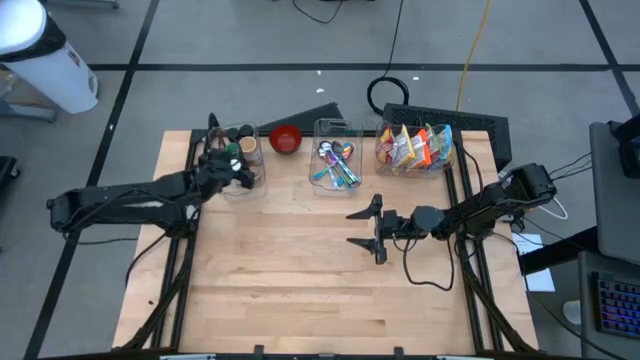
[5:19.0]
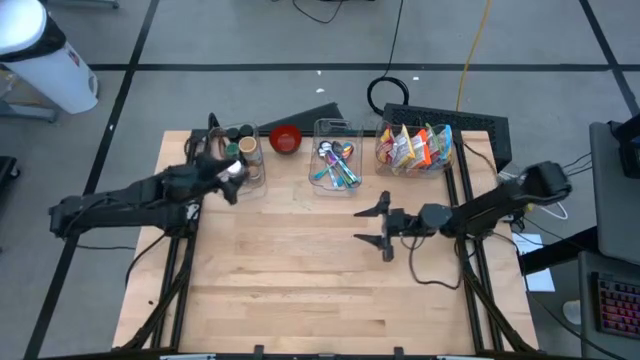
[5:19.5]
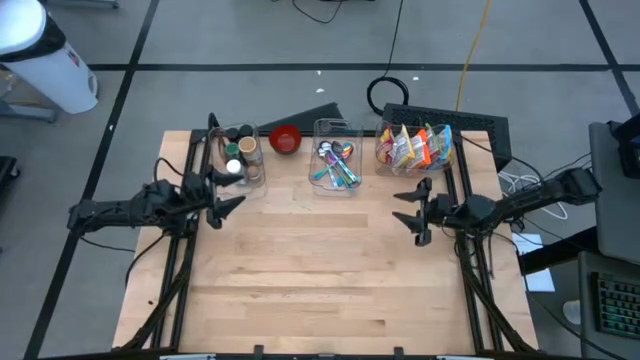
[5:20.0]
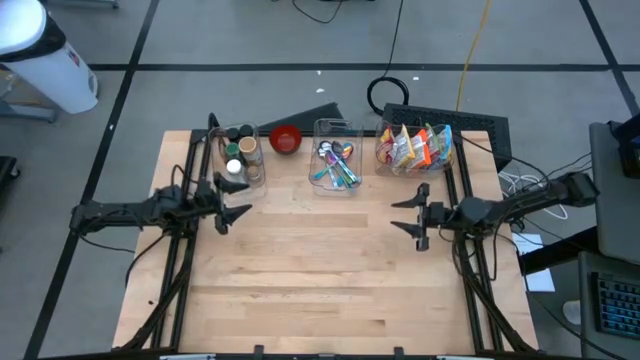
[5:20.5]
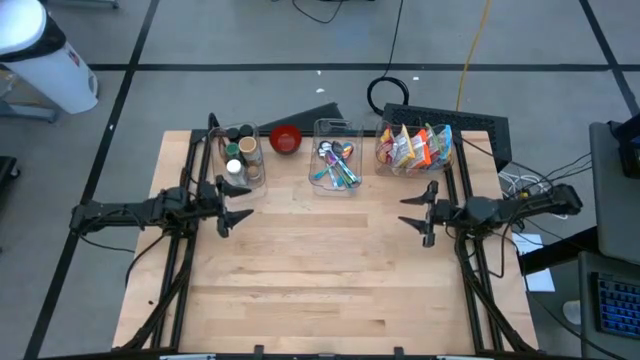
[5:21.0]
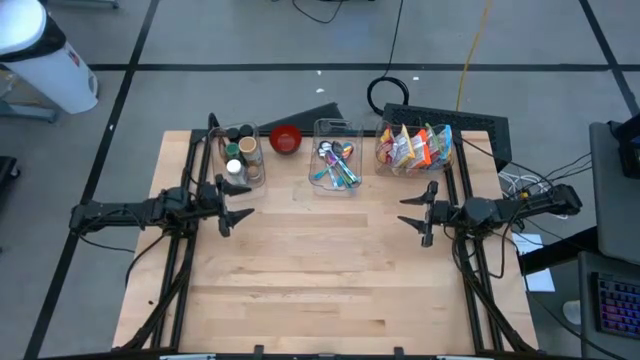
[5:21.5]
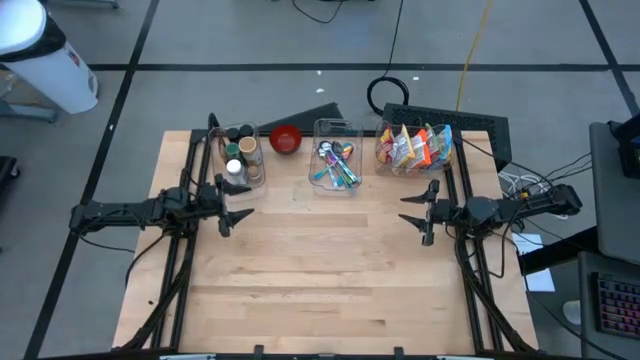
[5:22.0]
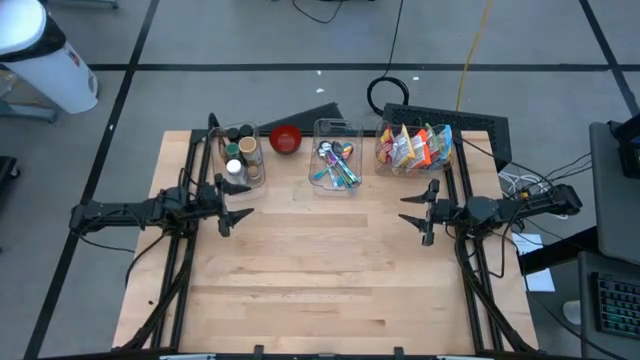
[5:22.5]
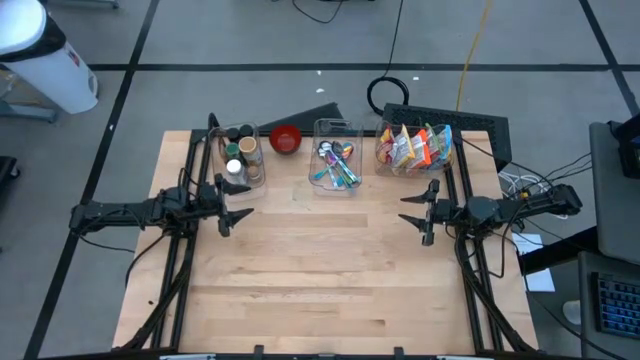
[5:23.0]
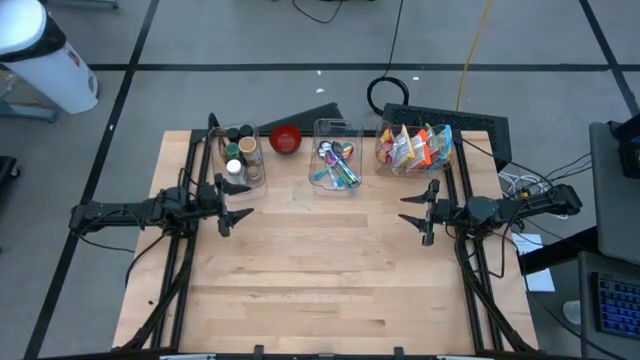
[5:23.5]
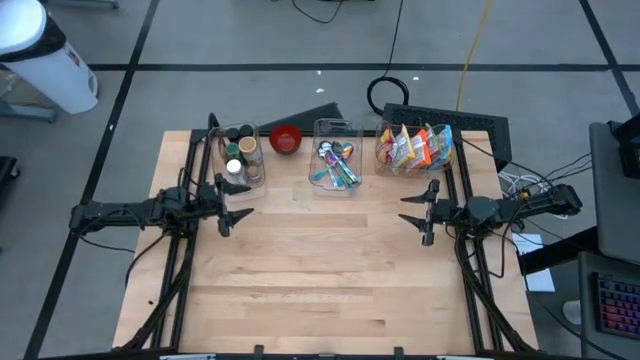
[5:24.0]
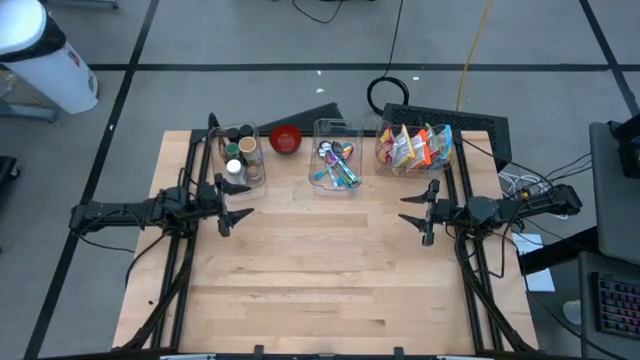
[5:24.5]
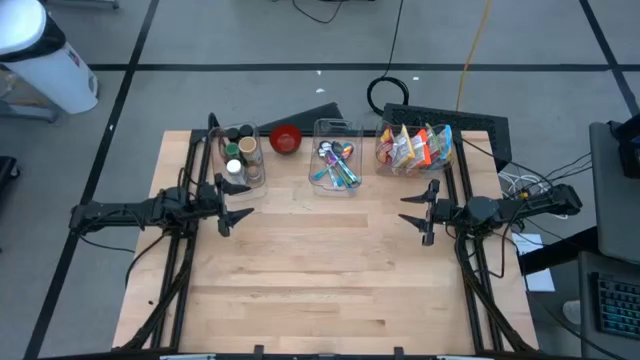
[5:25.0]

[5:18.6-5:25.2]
Task: Pick & Place Food Item
Return to Home Position

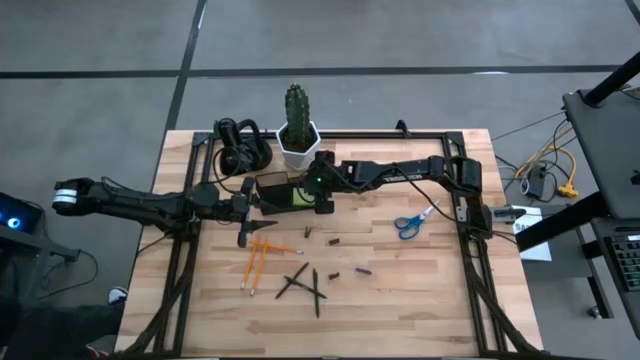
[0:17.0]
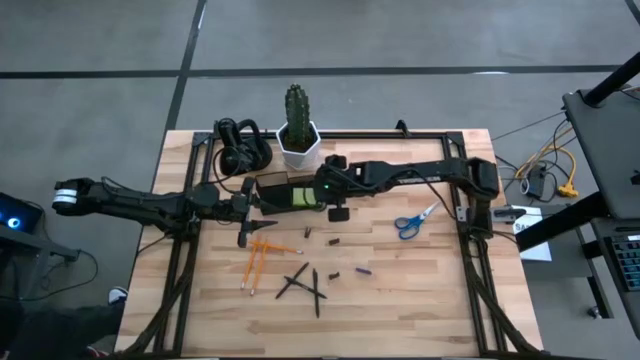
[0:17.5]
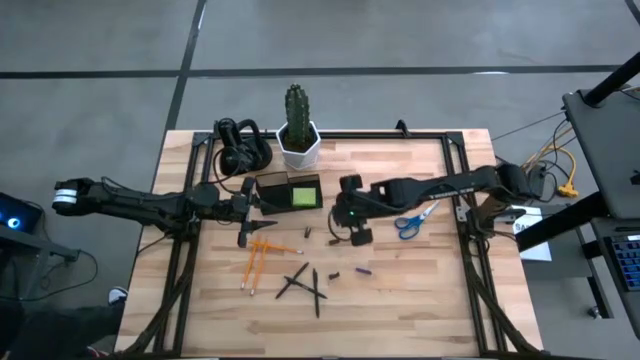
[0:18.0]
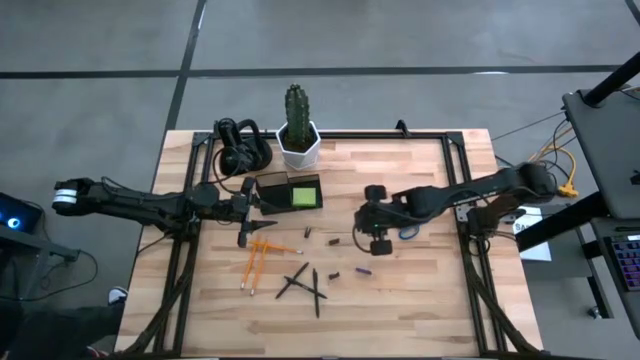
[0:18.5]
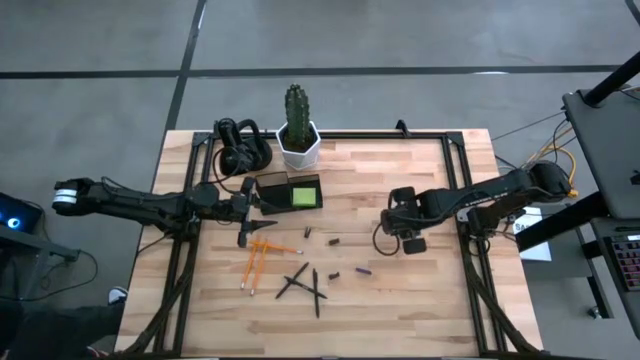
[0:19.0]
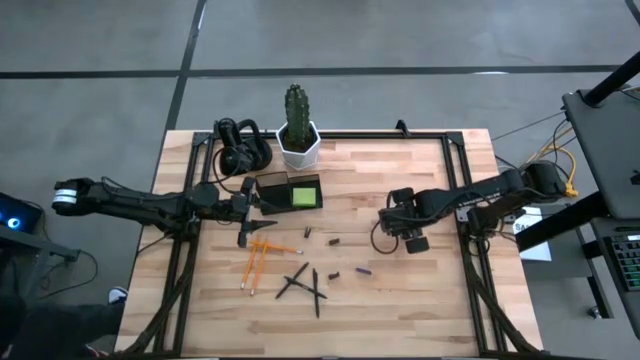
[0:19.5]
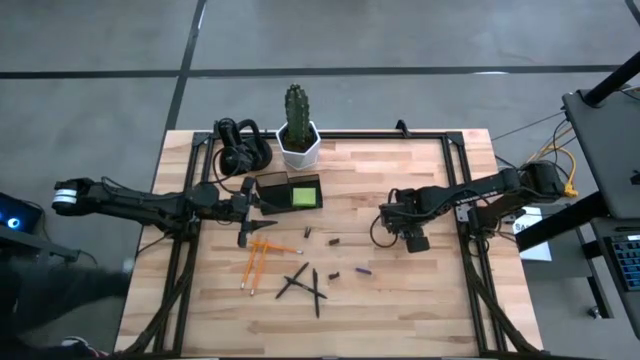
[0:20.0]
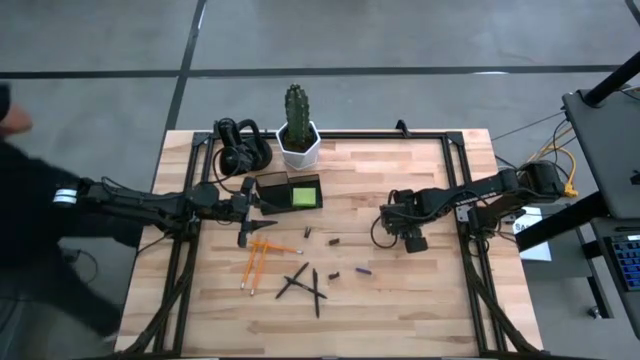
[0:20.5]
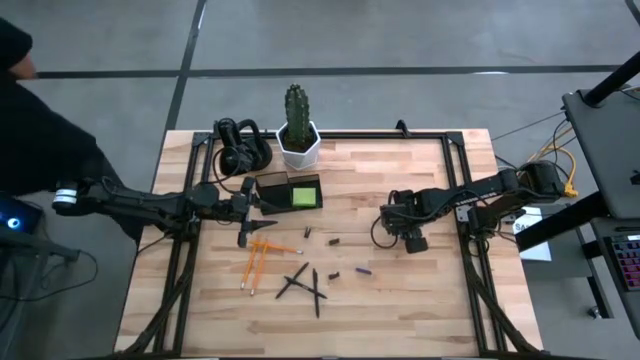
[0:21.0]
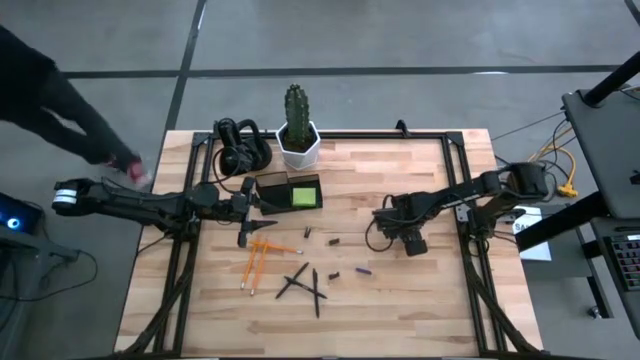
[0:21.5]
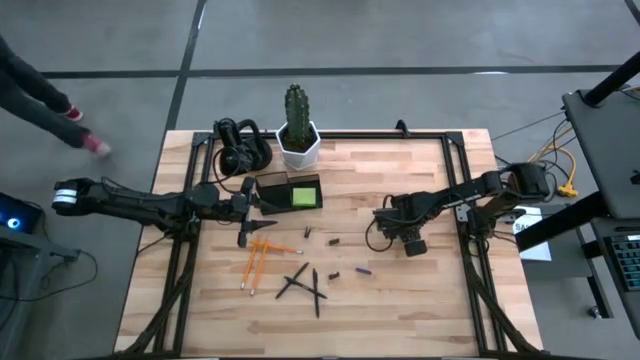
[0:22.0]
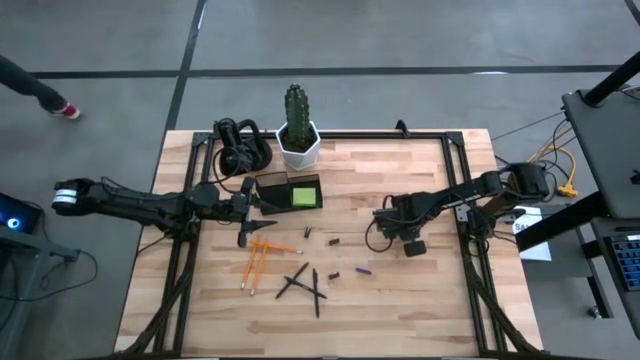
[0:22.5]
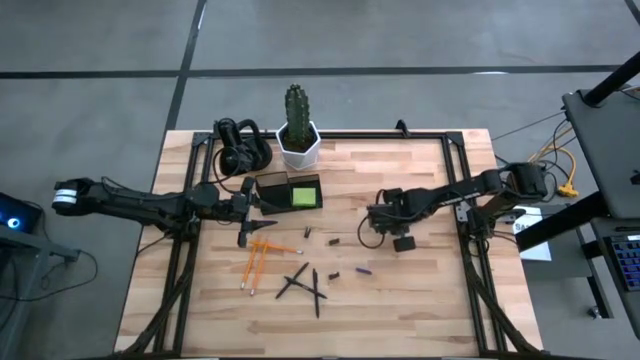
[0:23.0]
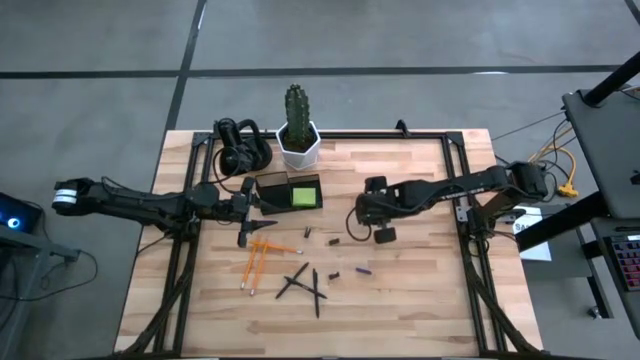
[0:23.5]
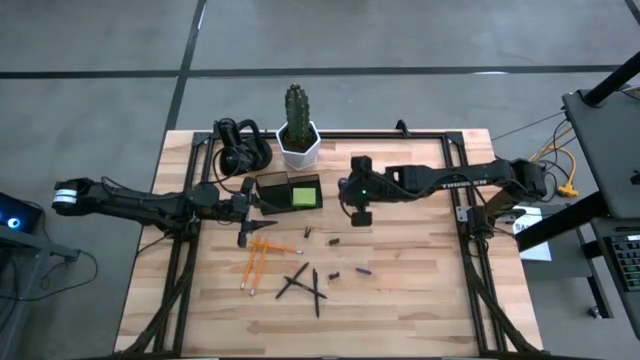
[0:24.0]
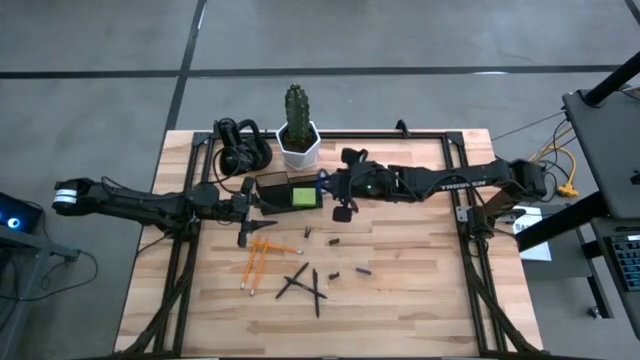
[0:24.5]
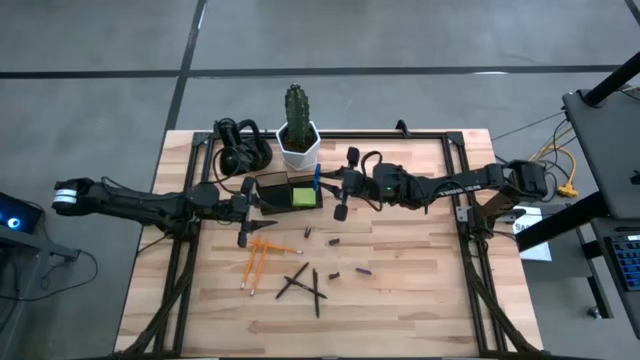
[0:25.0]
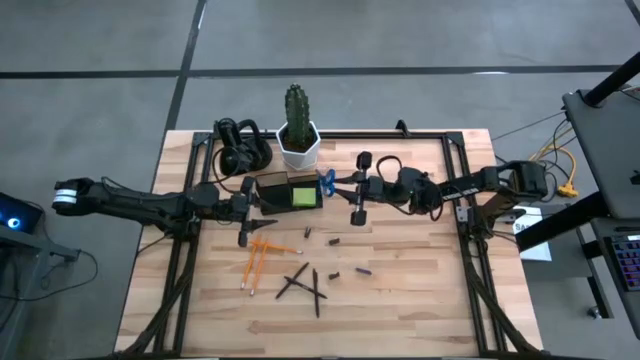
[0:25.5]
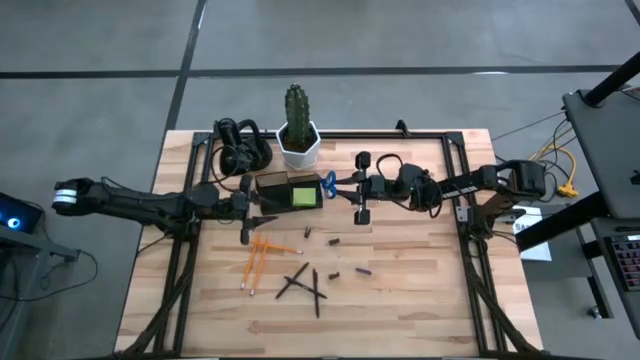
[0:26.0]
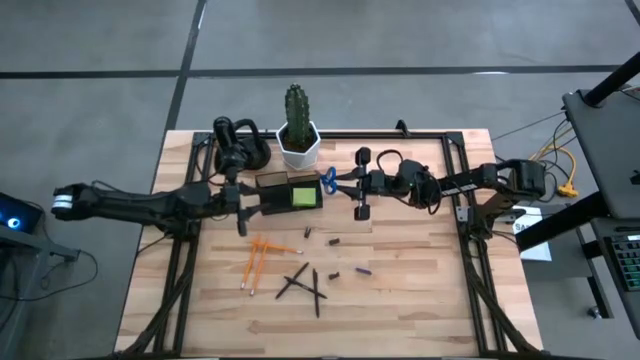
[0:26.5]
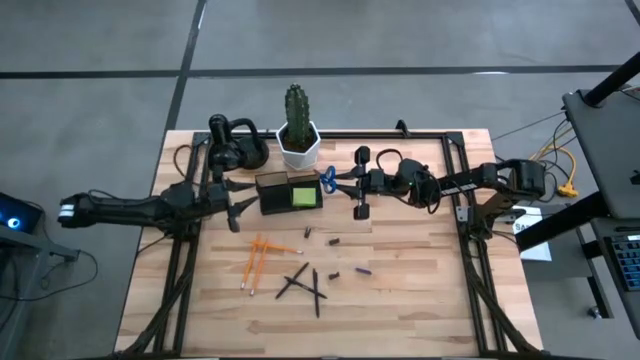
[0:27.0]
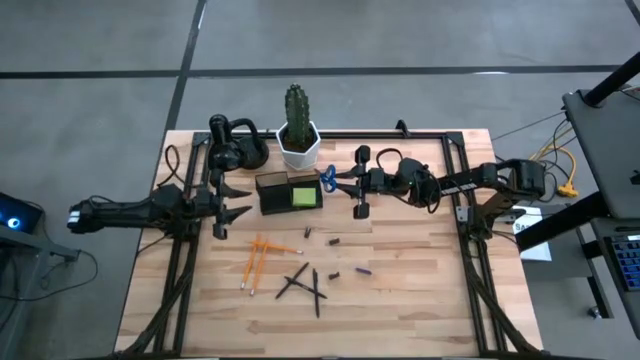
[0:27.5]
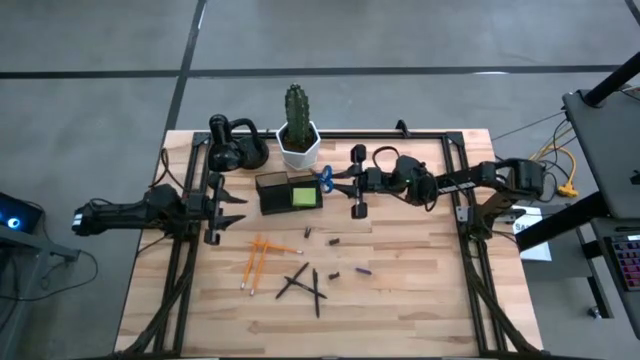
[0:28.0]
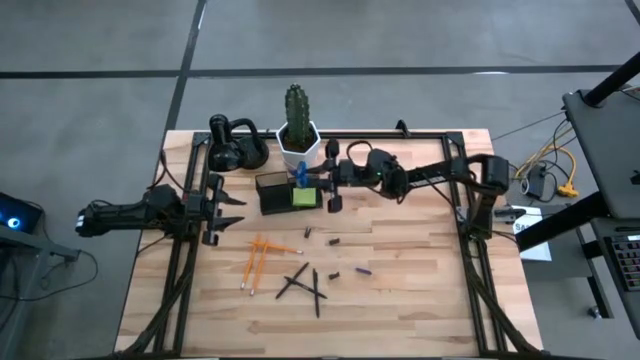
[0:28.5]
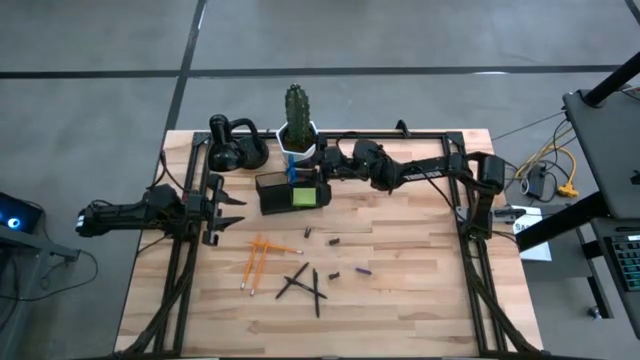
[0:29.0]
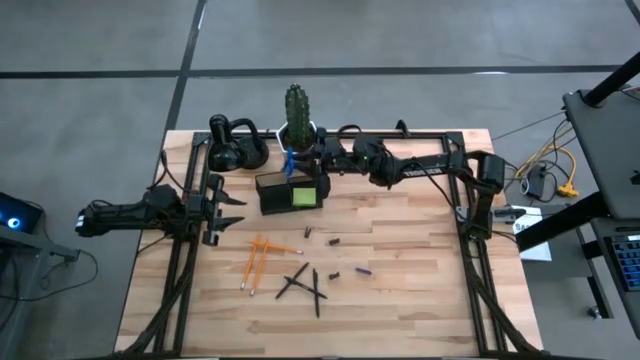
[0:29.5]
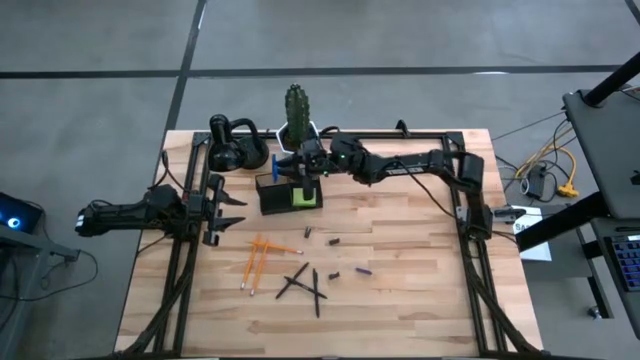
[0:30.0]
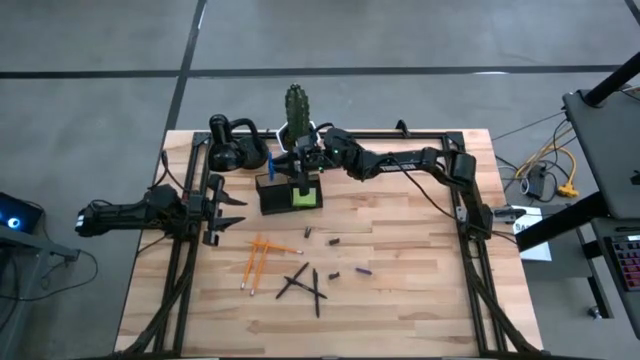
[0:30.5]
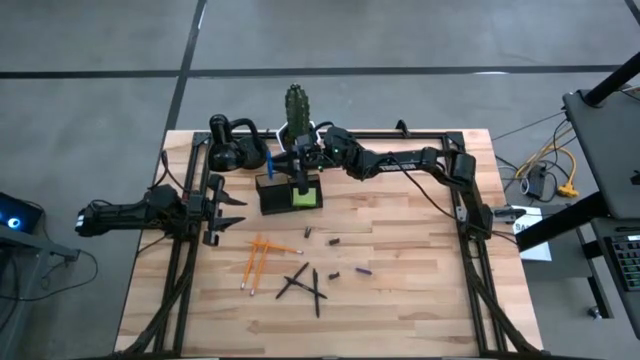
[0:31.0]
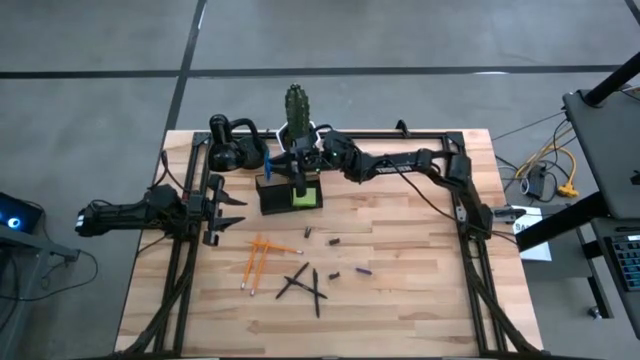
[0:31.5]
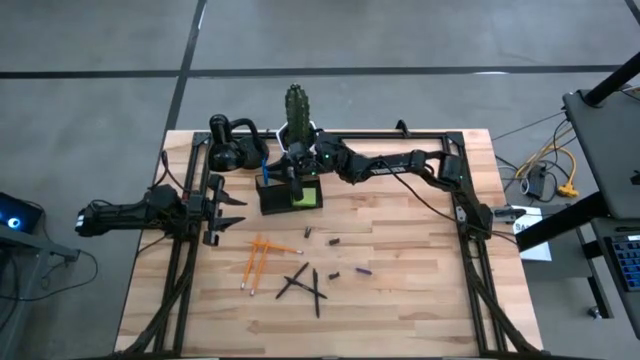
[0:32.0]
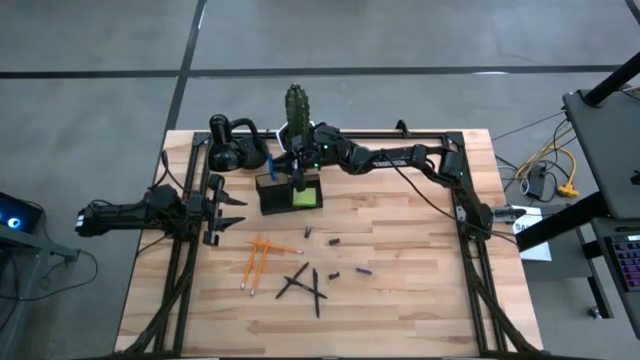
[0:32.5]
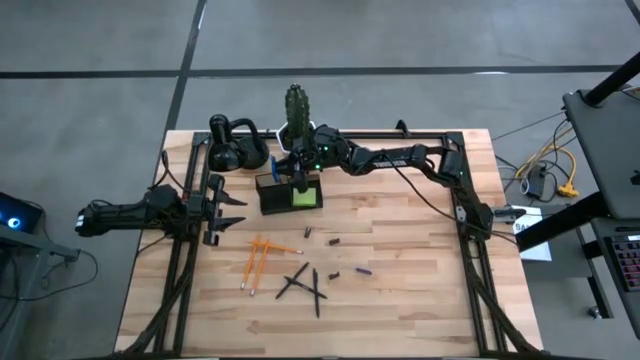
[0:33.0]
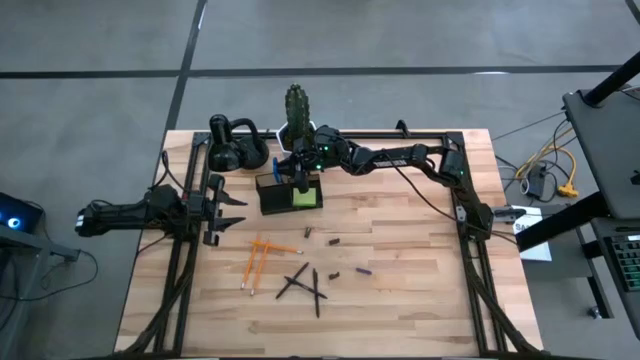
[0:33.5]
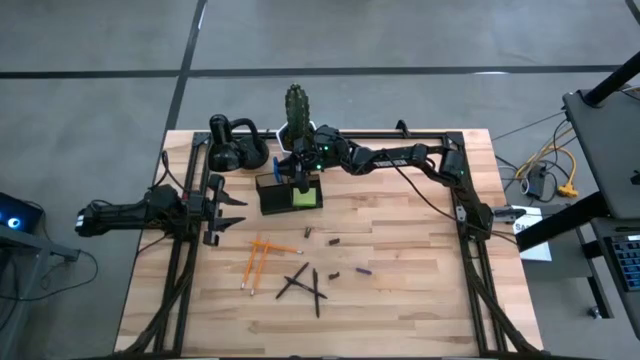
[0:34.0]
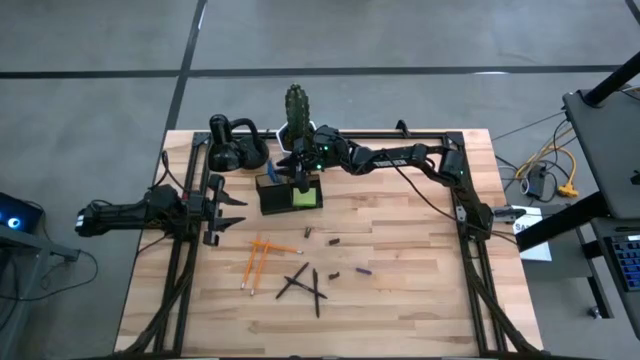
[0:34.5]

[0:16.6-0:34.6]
Task: Pick and place office supplies into organizer
Put the blue scissors into the black desk organizer
